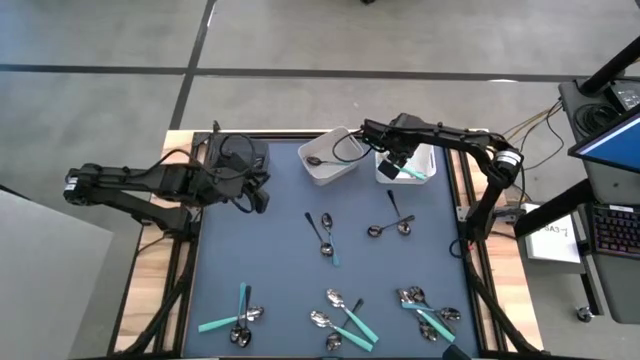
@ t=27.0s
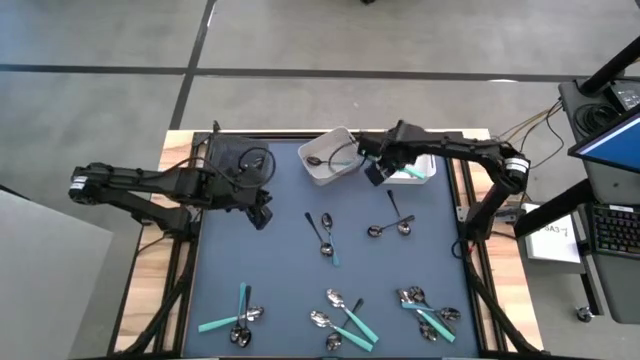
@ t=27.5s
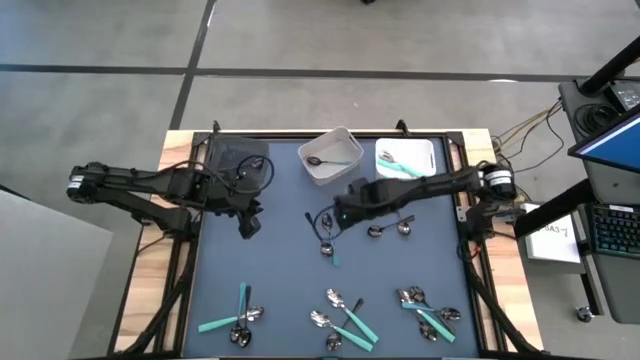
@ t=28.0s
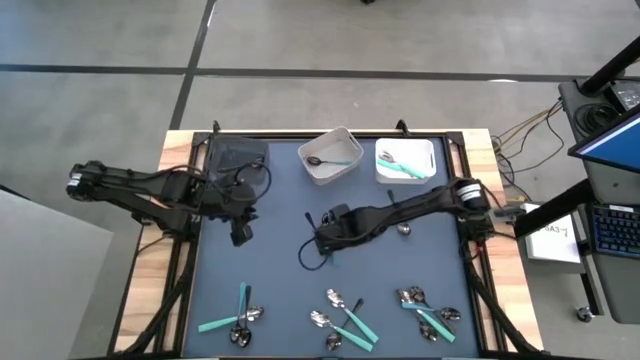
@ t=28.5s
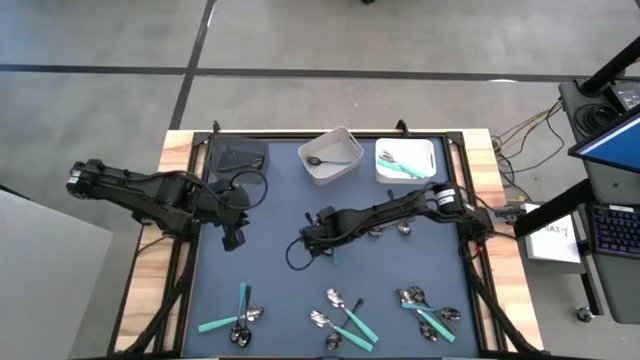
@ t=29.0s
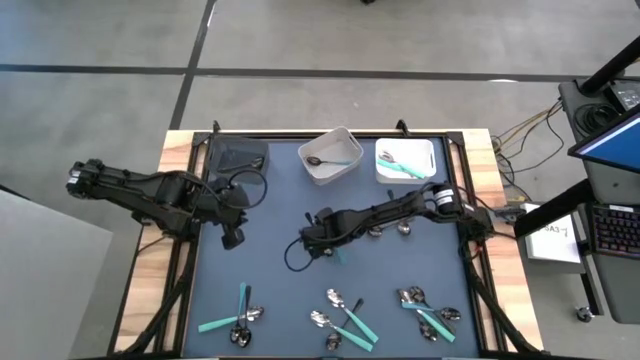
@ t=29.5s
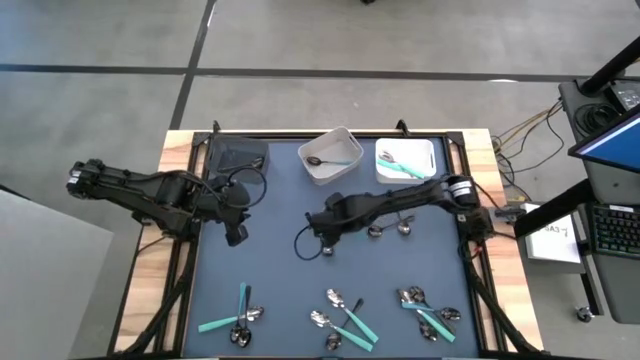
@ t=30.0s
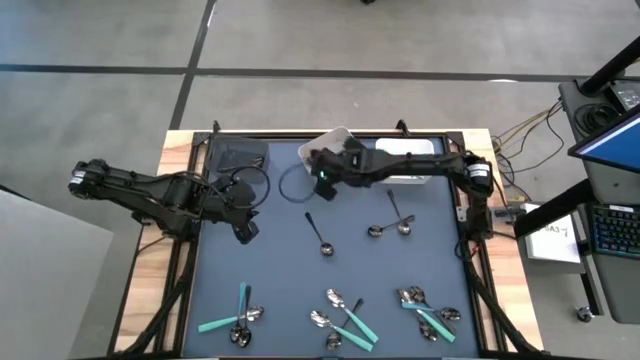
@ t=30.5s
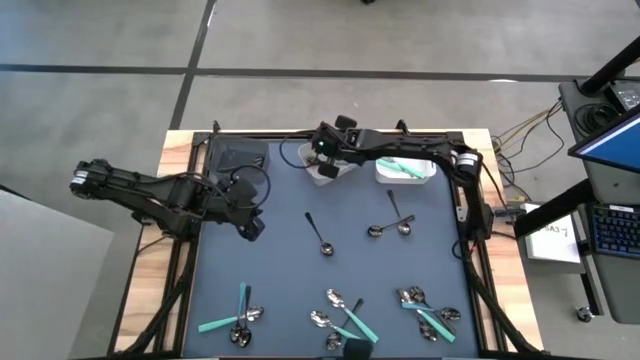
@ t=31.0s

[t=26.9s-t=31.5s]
Task: Sort silverware by color (type)
Put the blue spoon into the gray bin

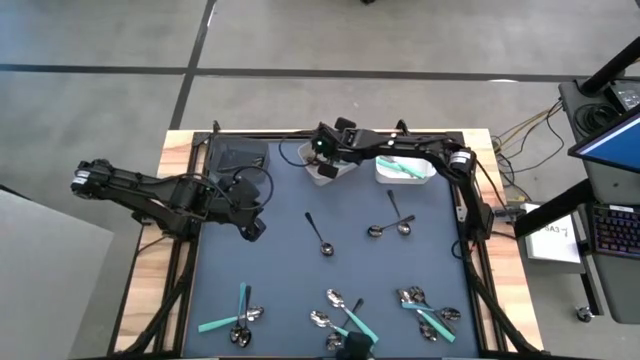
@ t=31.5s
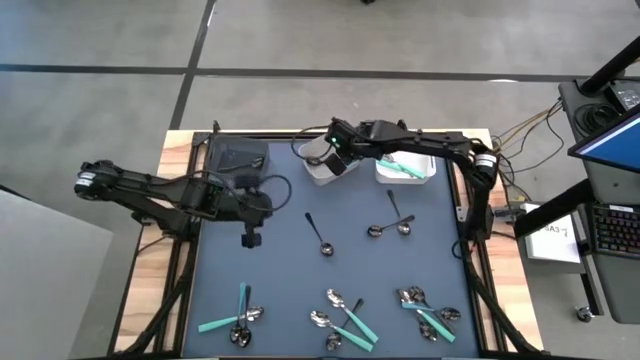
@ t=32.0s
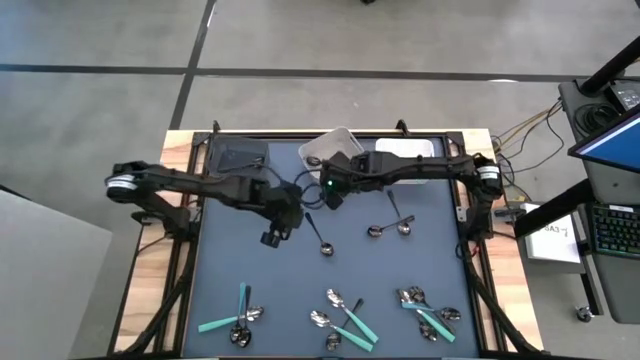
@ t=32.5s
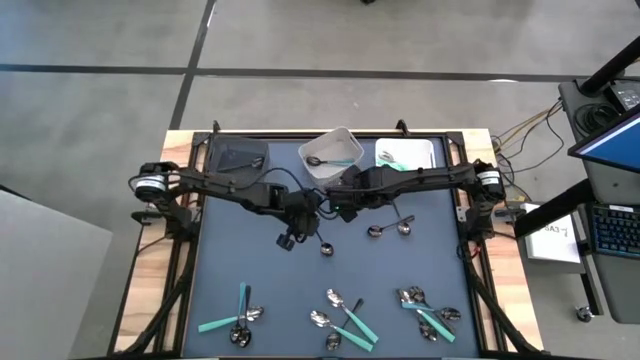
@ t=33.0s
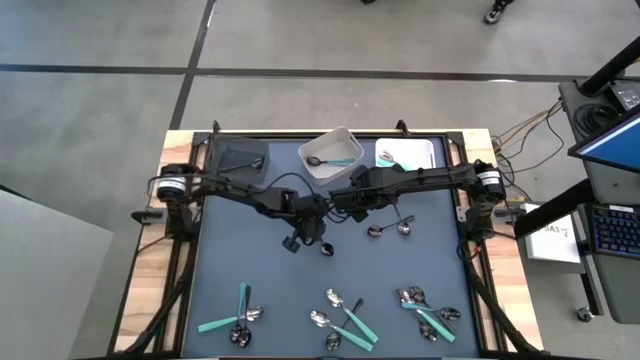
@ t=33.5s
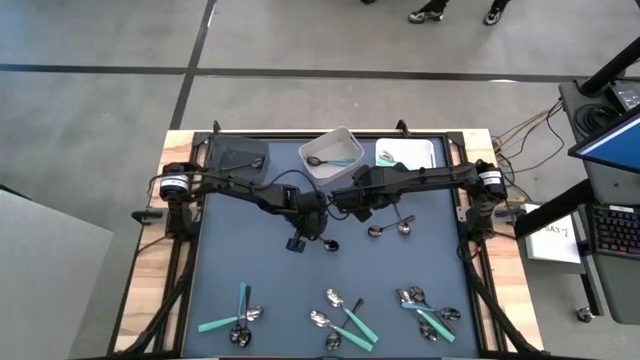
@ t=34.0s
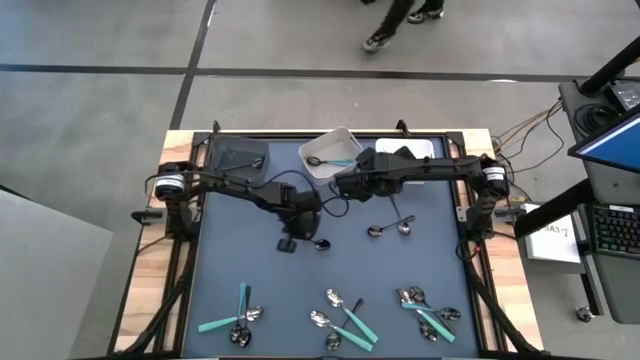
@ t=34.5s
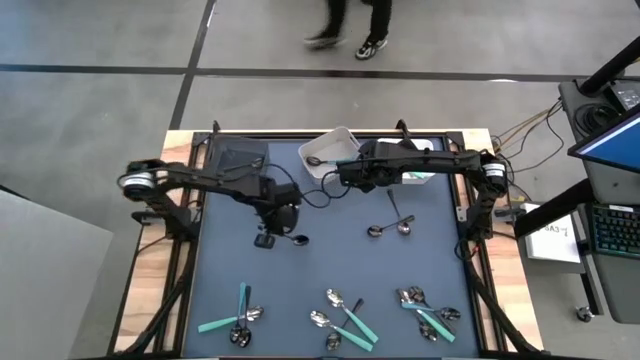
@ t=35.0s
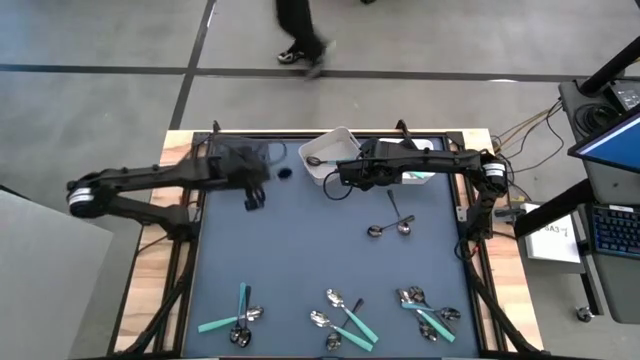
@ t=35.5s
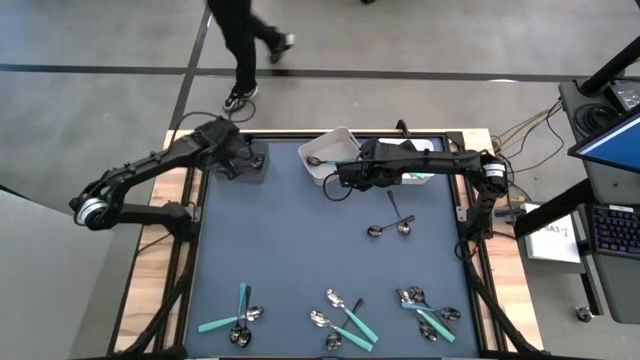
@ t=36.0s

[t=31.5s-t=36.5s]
Put the black spoon into the black bin

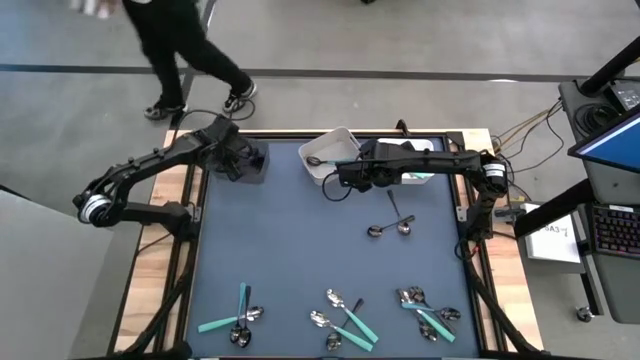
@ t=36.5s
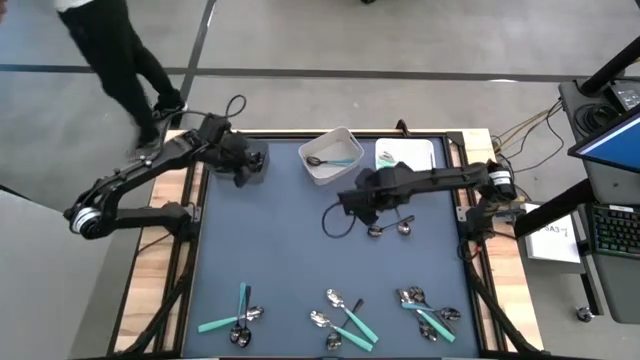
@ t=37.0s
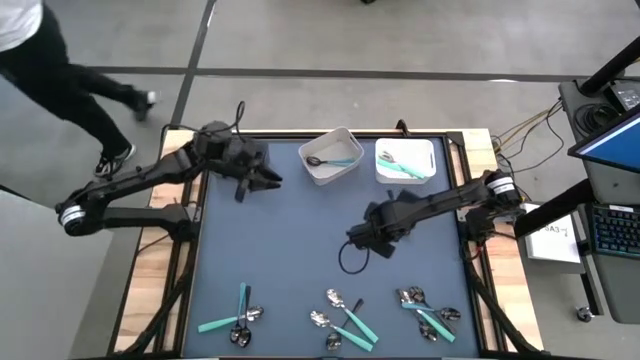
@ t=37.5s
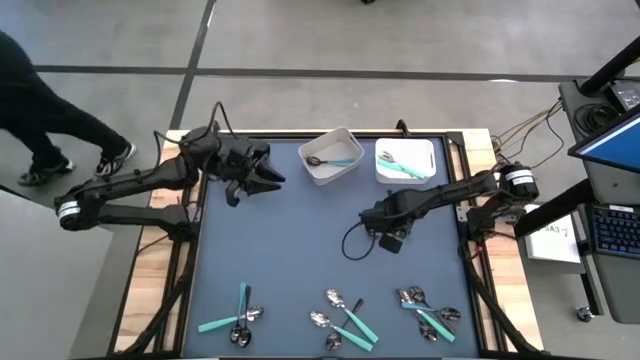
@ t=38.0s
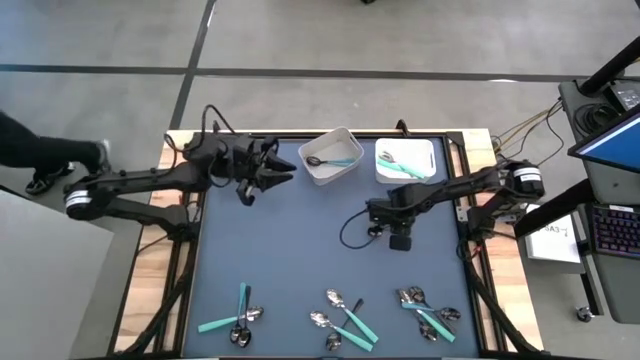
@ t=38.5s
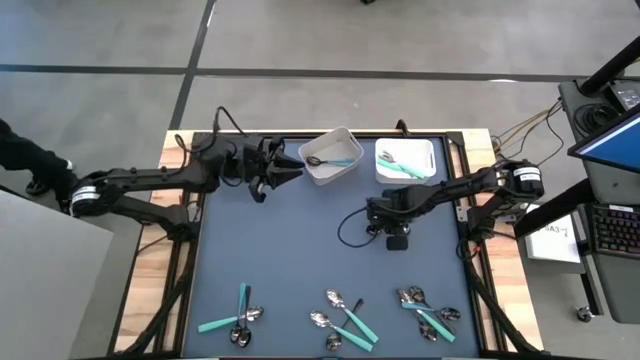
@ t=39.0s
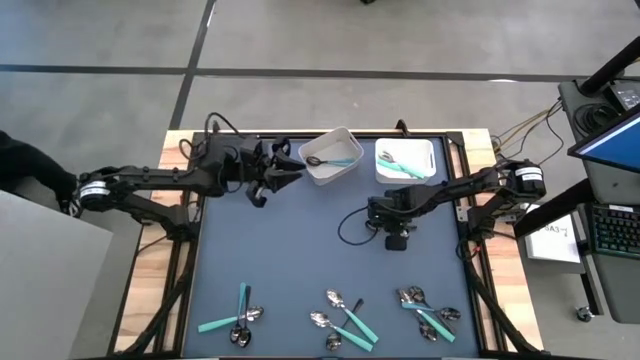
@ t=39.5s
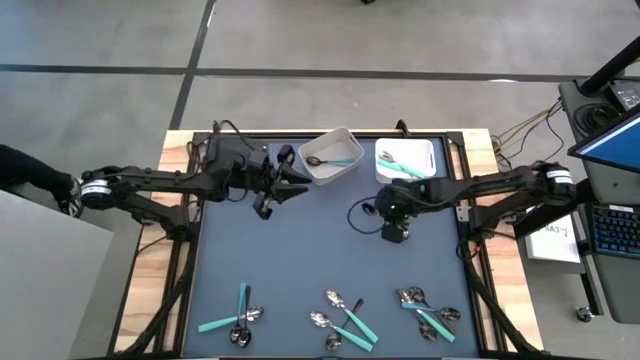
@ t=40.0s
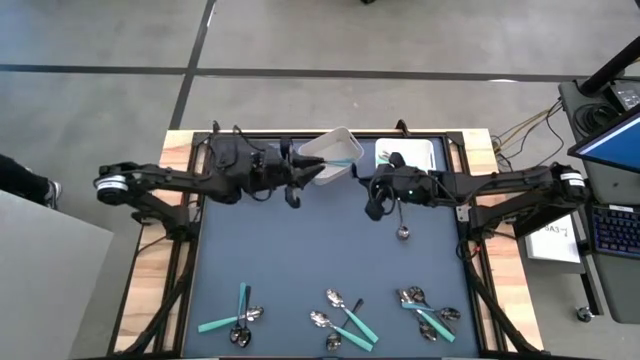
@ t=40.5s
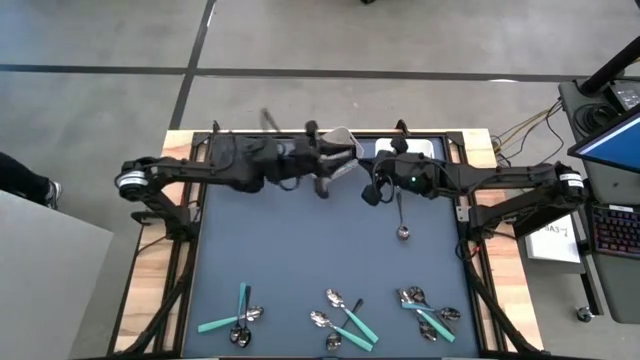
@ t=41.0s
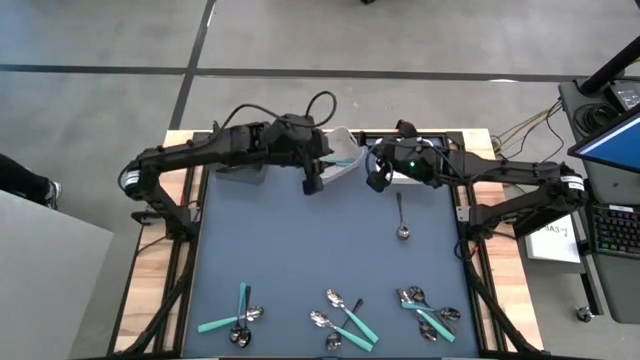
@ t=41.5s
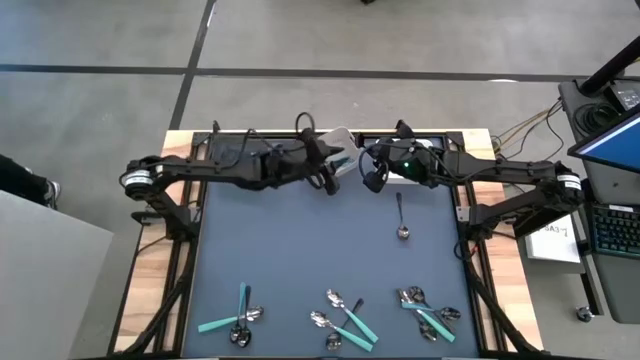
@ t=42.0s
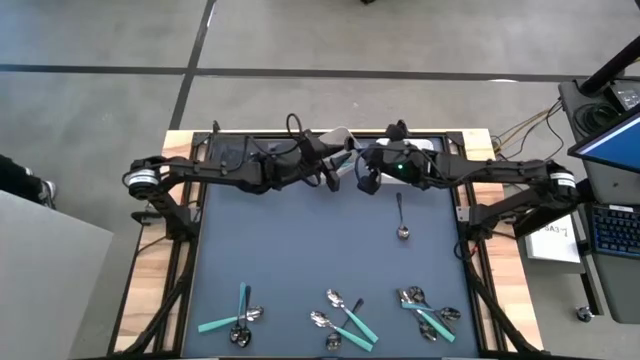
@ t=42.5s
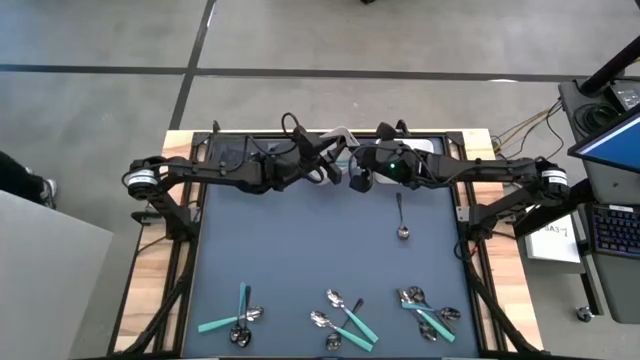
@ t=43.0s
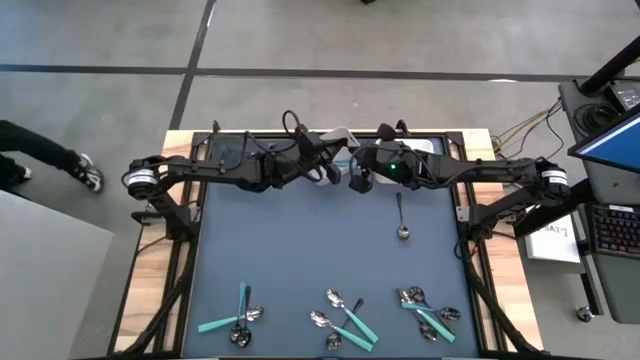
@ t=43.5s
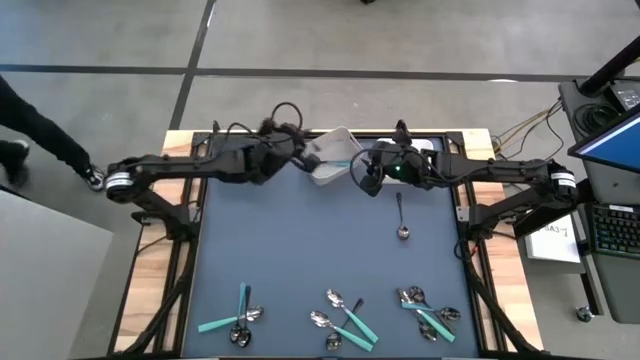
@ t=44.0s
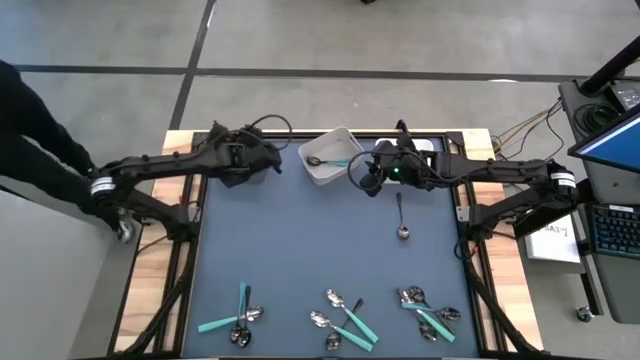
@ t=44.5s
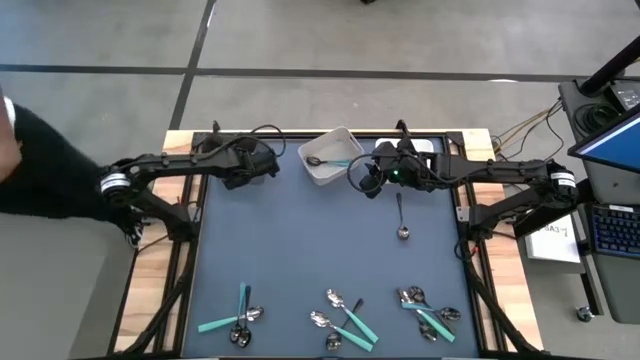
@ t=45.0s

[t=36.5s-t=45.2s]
Put the black spoon into the black bin

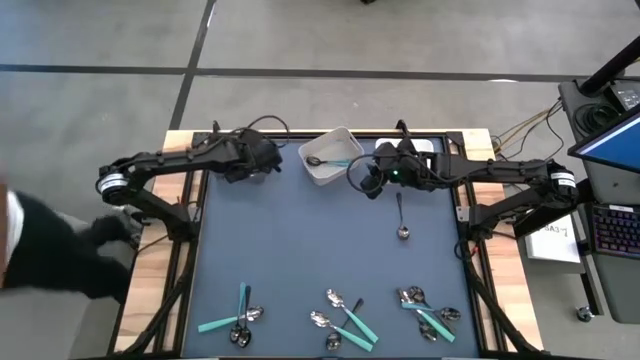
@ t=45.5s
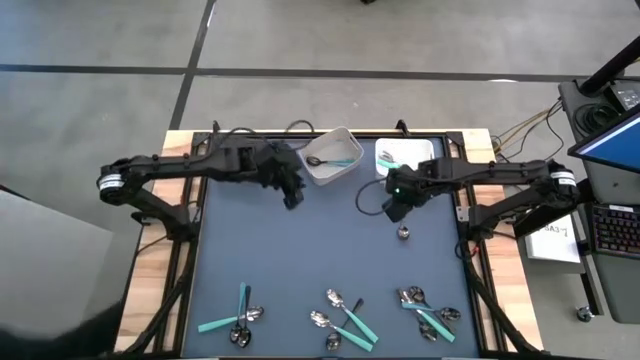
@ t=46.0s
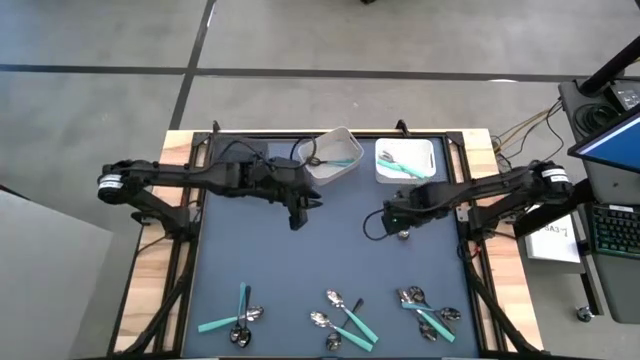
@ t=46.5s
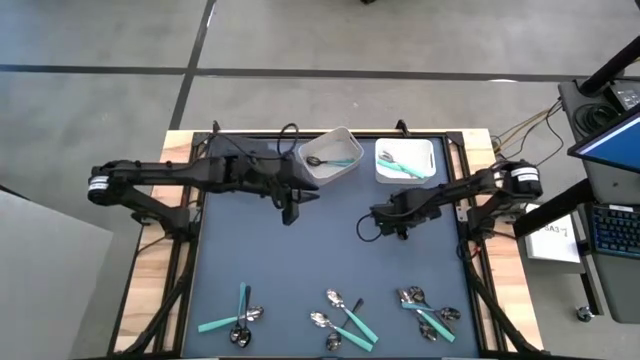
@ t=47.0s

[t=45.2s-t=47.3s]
Put the black spoon into the black bin

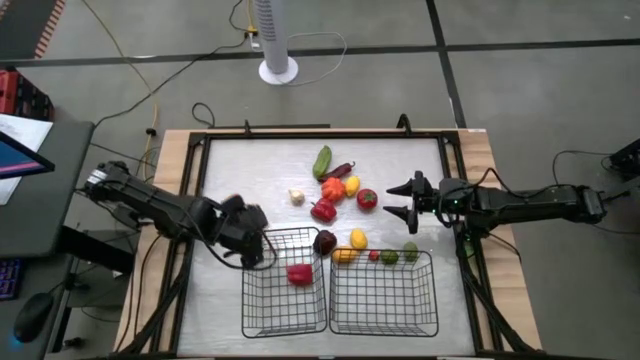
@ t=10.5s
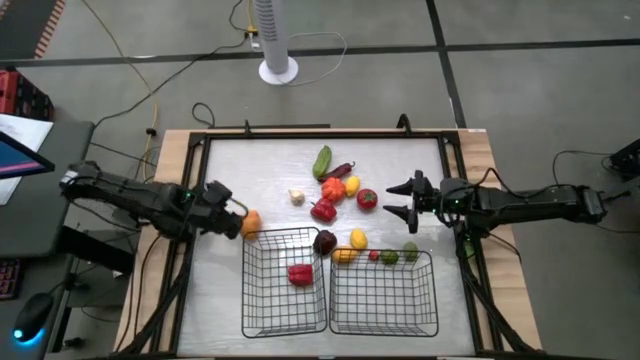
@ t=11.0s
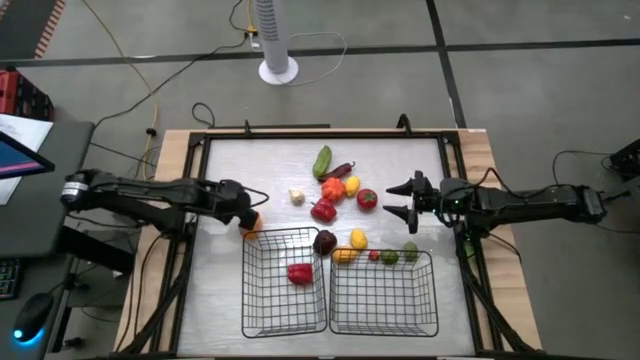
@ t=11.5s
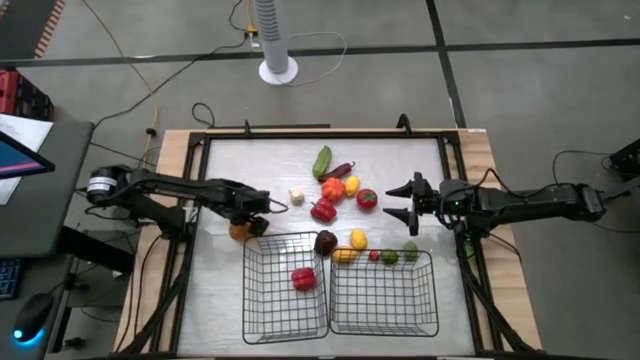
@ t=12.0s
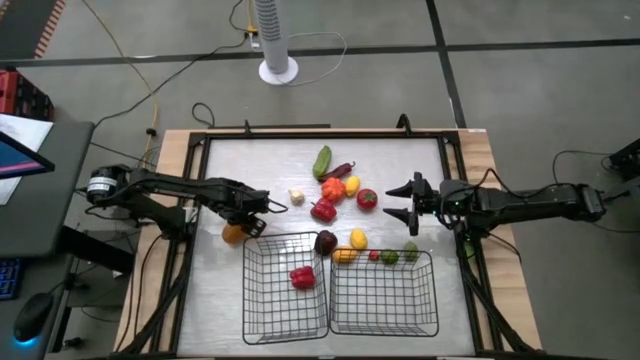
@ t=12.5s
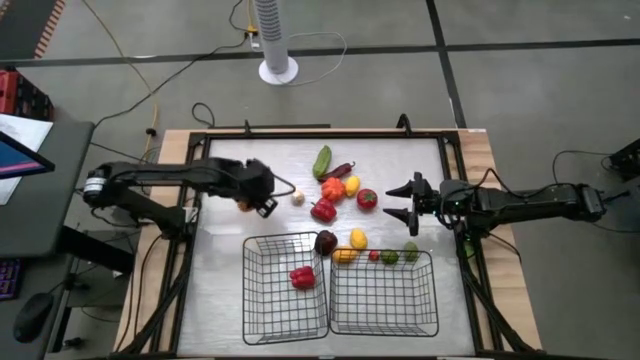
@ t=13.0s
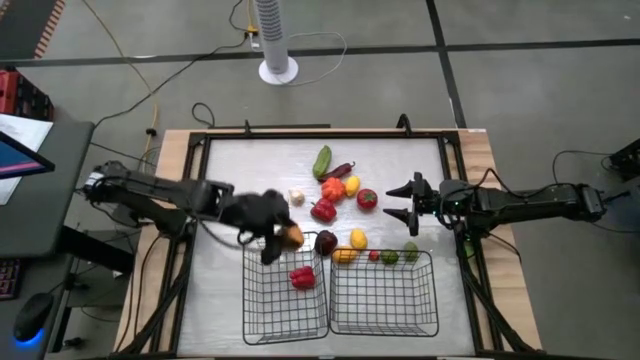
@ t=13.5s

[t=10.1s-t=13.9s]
Task: Sort produce into baskets
Put the brown potato into the left black wire basket
